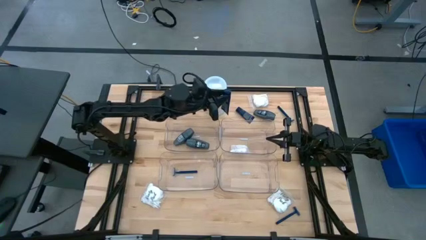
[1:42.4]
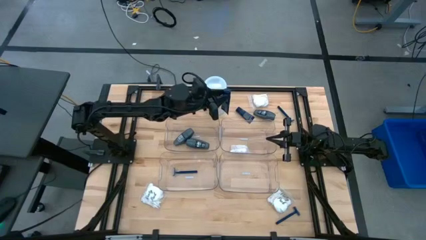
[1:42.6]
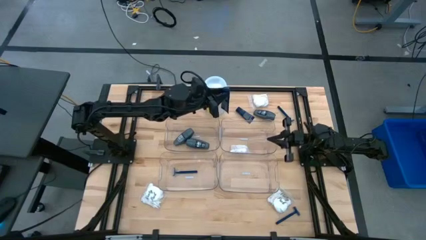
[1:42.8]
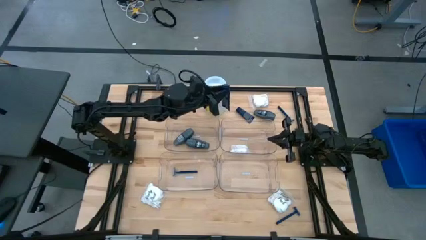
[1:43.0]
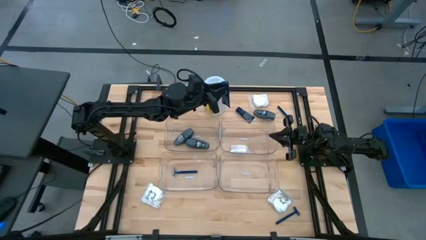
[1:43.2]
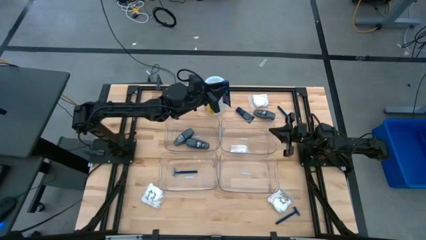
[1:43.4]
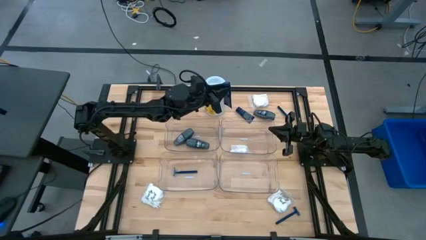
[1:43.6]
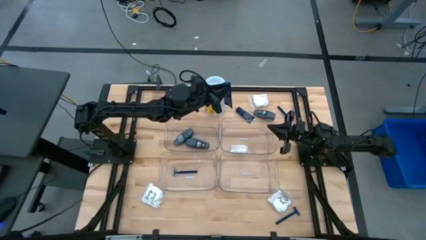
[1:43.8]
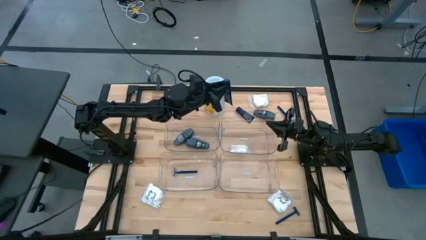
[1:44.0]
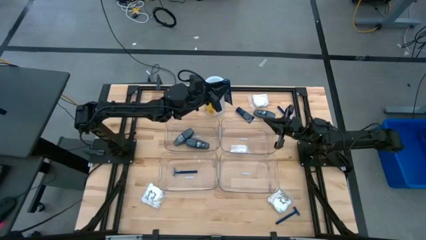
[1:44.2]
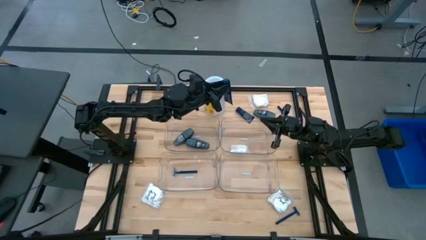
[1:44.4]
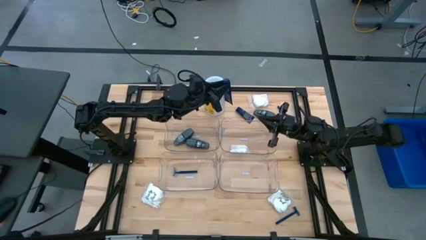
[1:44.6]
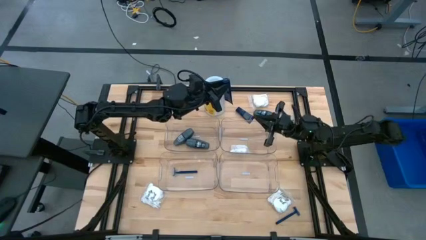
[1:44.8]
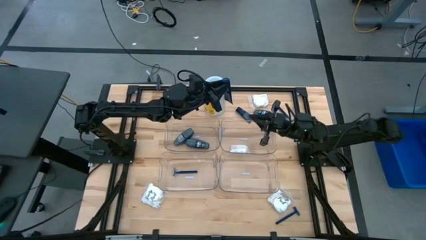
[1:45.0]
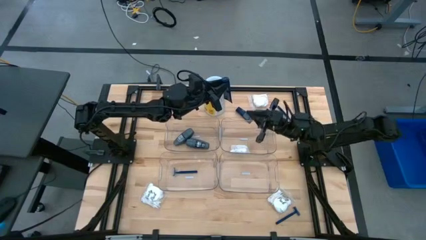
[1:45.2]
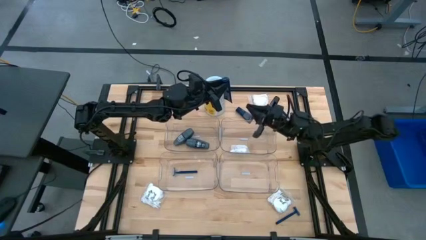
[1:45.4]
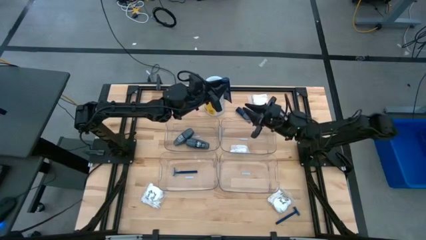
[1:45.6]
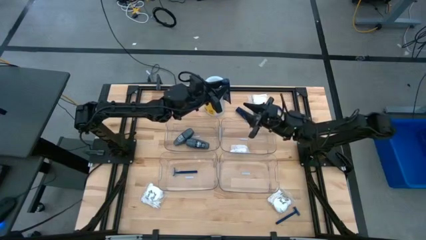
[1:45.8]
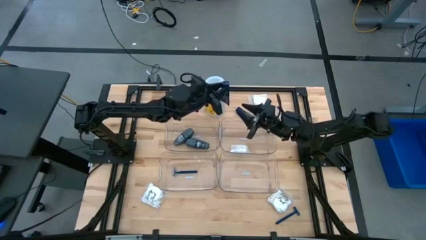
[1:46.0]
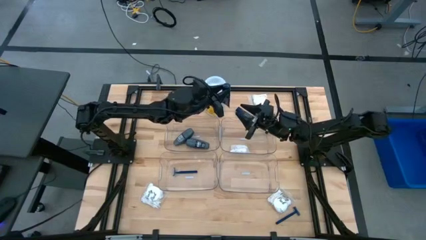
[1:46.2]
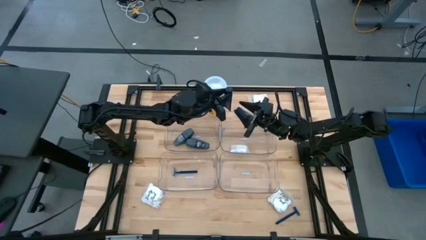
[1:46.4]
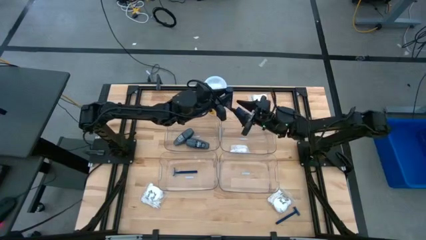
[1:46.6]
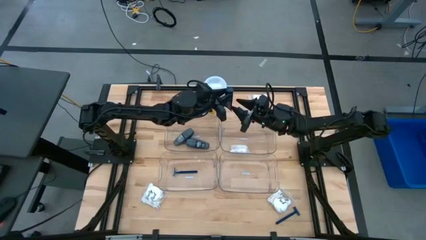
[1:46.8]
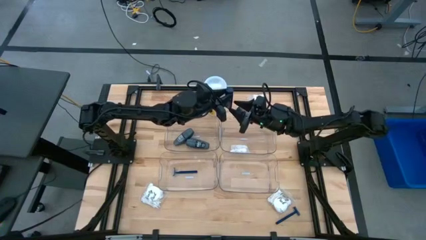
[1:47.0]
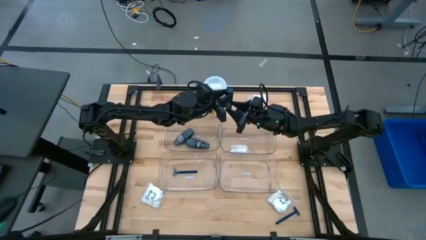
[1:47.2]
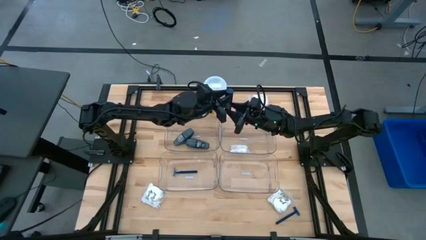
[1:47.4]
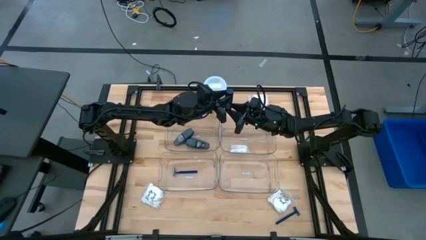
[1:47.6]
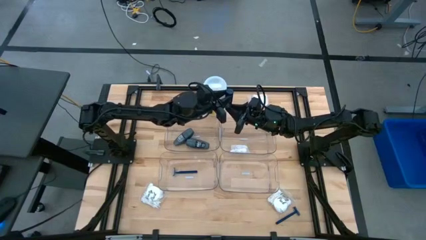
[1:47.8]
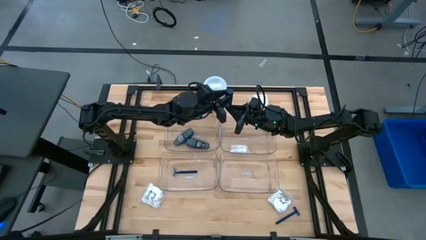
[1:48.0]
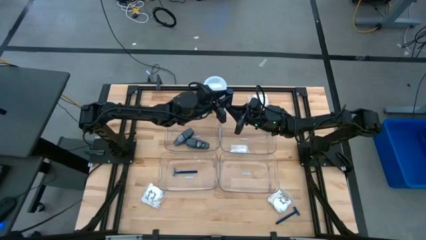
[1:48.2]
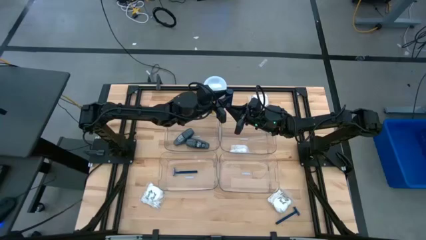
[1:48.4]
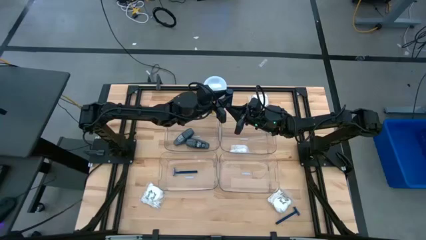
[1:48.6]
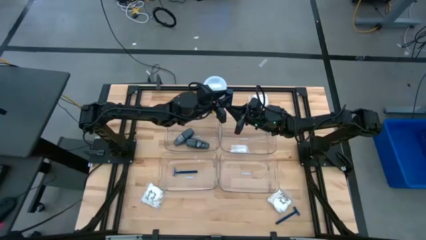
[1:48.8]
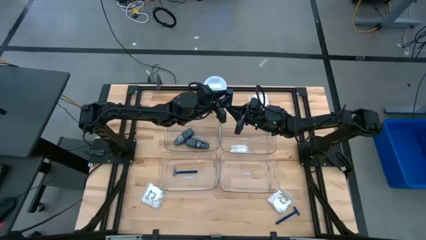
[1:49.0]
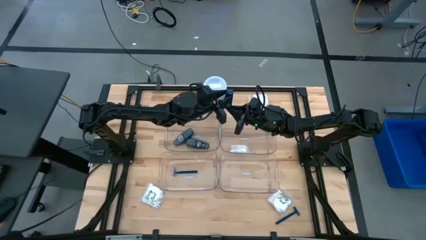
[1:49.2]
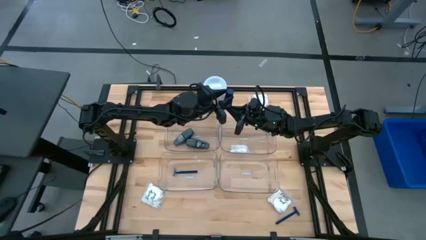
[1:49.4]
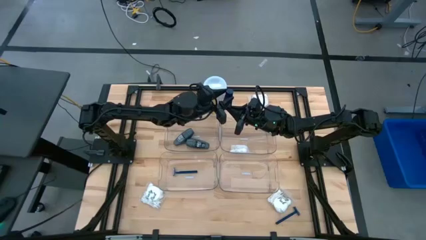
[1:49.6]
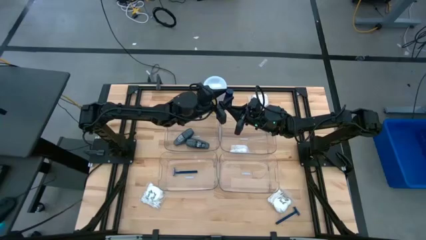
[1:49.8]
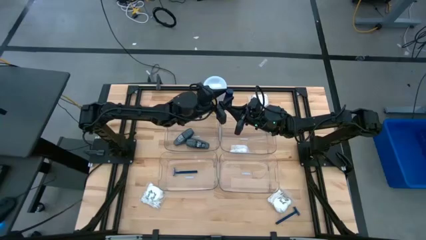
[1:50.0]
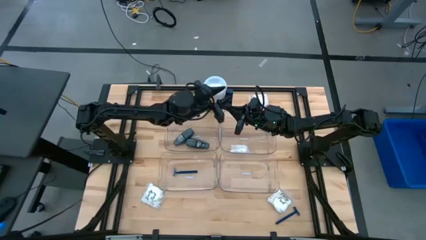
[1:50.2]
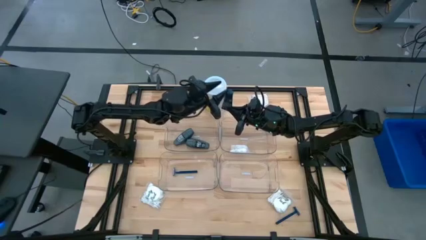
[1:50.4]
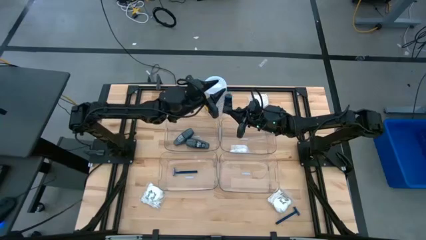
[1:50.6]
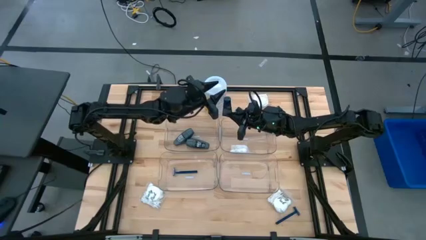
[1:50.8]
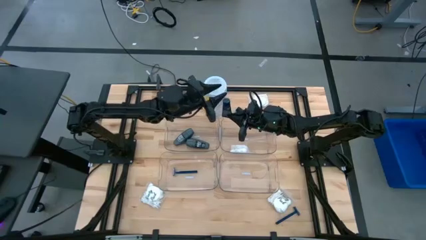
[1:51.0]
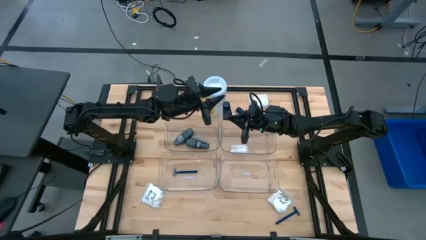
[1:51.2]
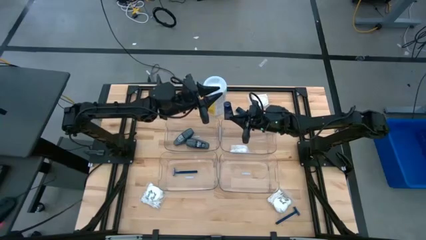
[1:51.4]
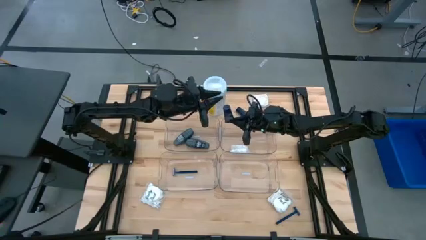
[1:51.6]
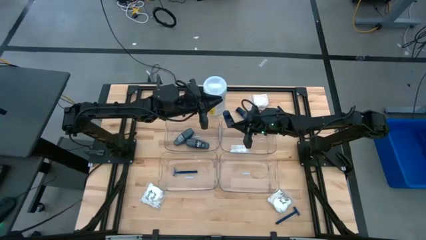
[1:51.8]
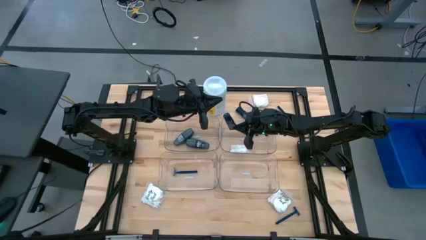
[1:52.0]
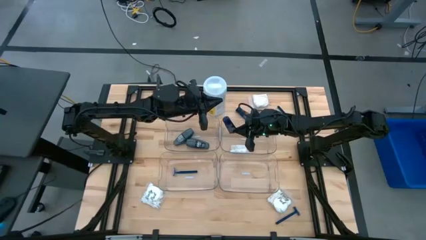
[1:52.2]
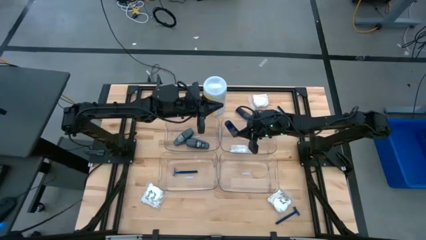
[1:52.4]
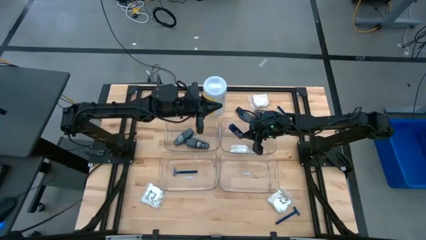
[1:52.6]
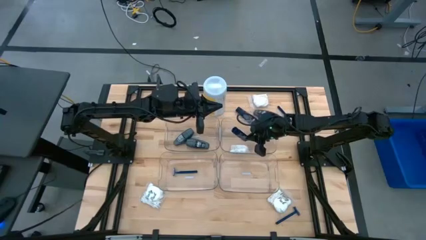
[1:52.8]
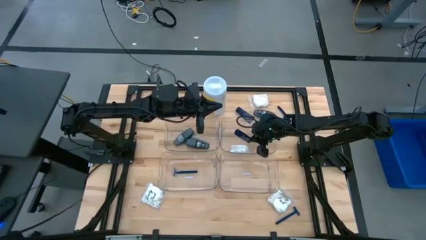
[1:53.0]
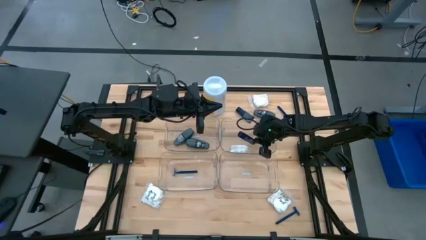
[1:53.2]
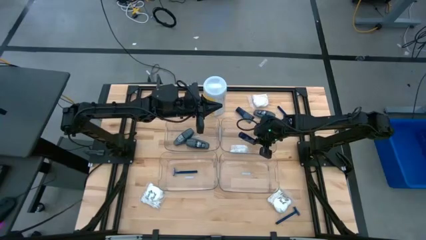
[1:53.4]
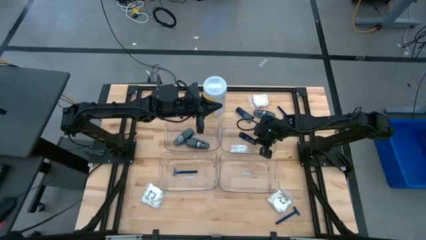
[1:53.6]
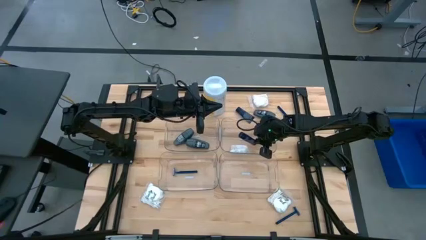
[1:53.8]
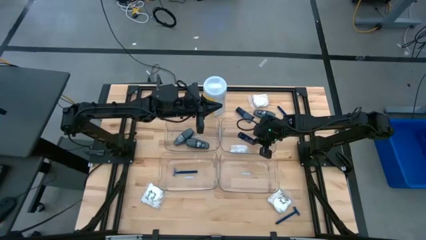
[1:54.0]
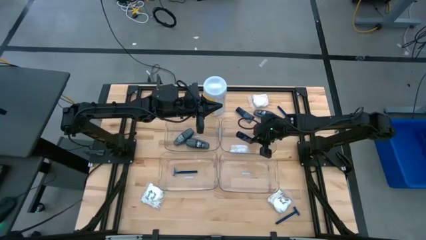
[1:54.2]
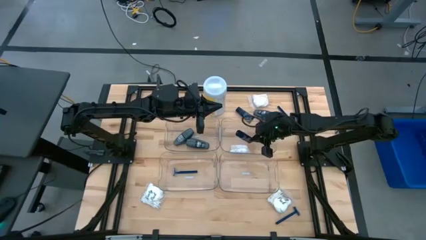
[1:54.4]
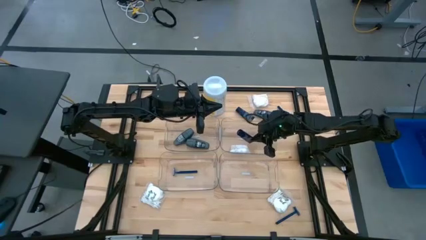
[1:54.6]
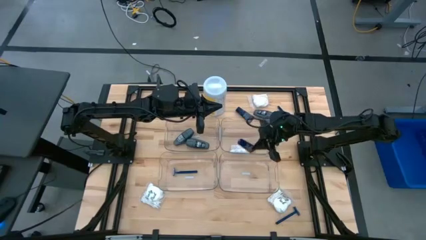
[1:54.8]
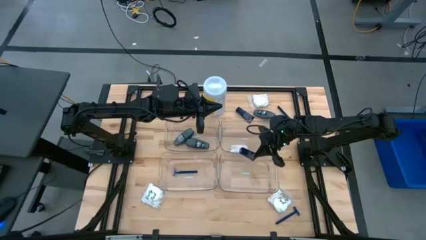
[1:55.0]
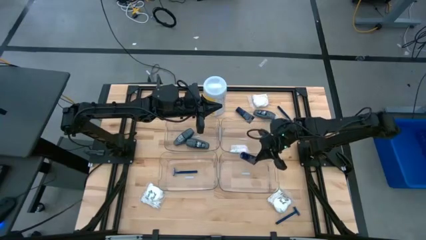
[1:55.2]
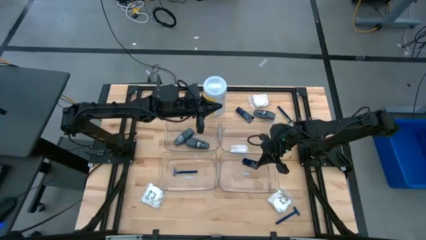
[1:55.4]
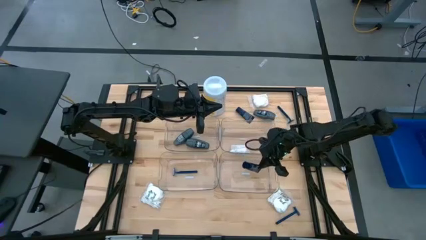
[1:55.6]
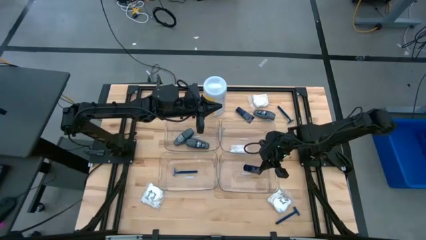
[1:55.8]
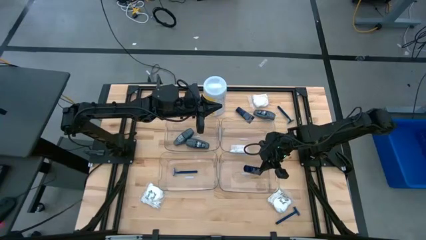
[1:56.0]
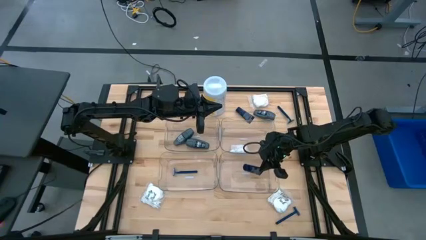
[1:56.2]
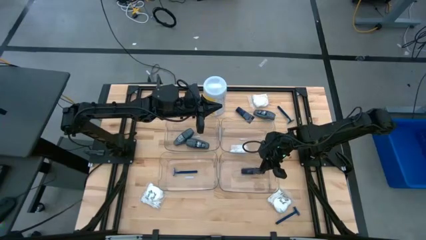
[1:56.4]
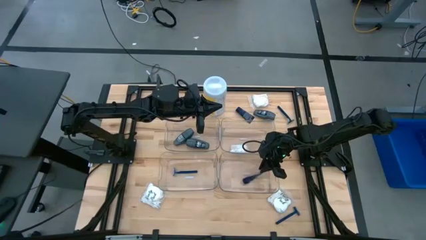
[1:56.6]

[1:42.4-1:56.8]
Task: Pick & Place Travel size toiletries
Put the left blue shaver cream into the bottom right transparent bin
